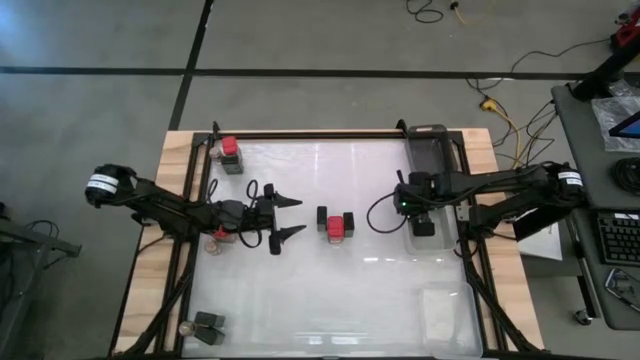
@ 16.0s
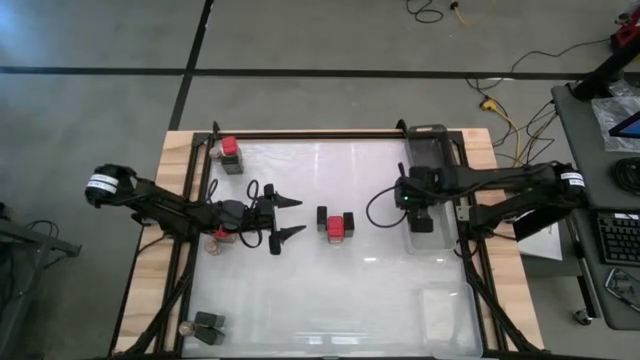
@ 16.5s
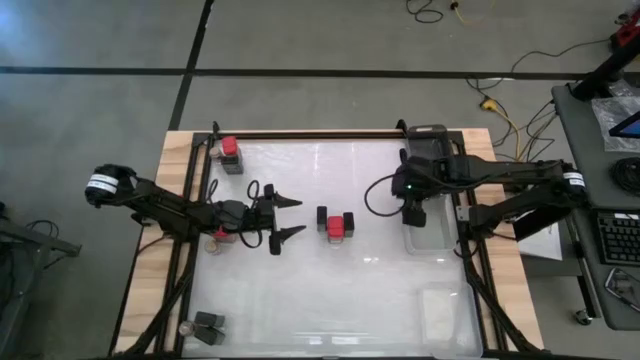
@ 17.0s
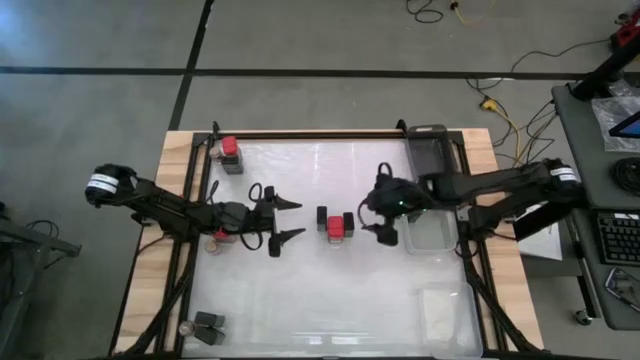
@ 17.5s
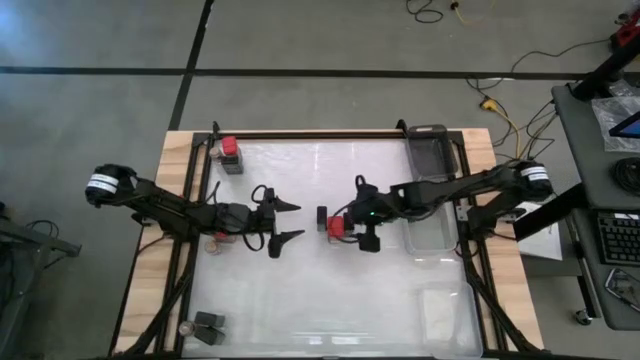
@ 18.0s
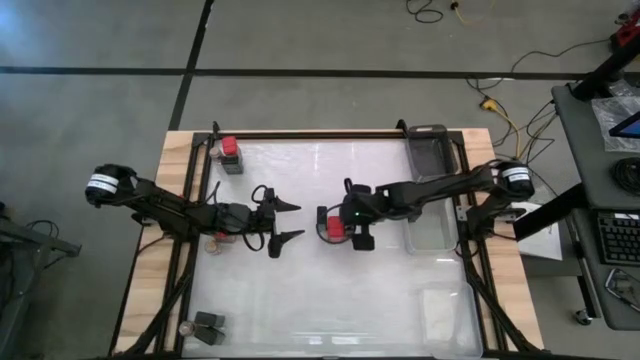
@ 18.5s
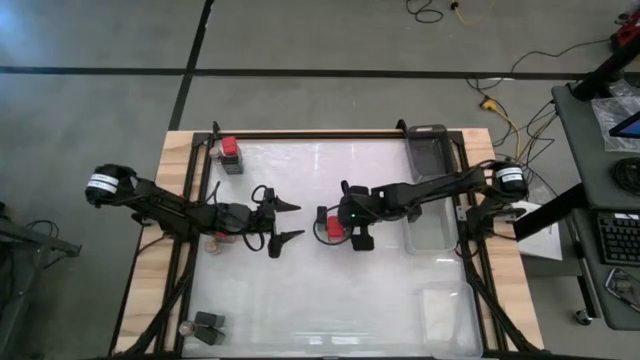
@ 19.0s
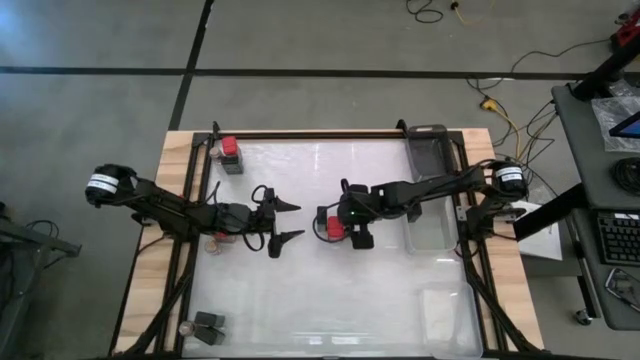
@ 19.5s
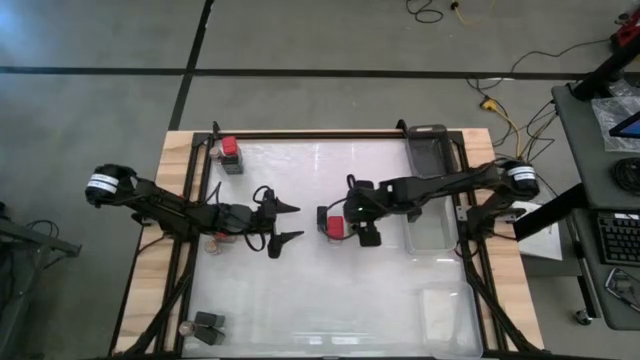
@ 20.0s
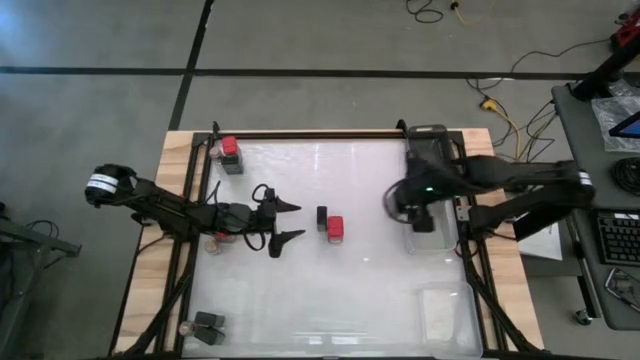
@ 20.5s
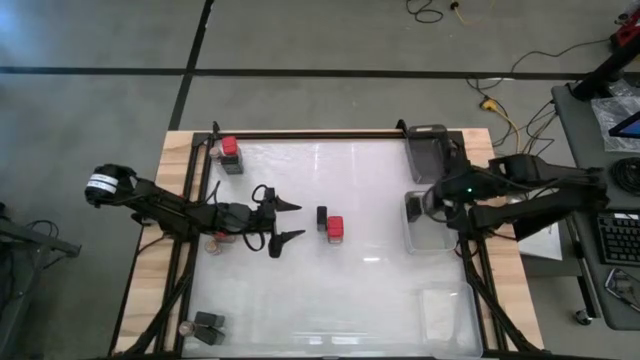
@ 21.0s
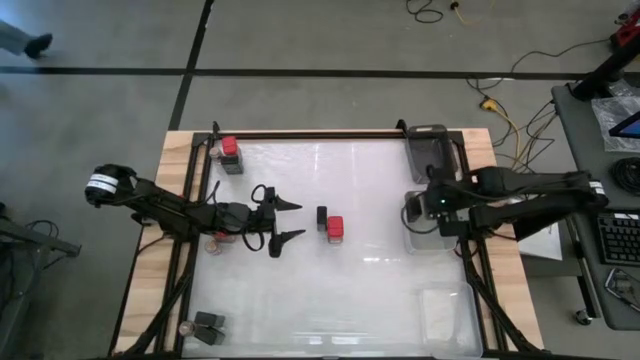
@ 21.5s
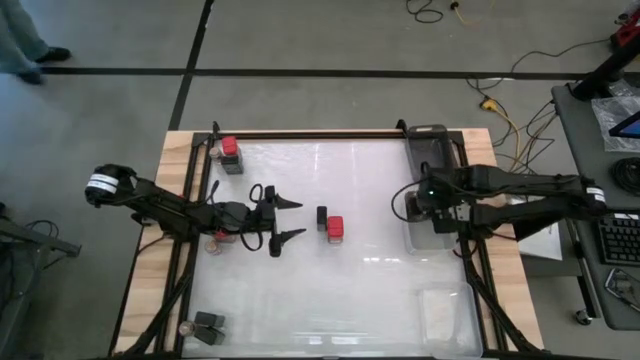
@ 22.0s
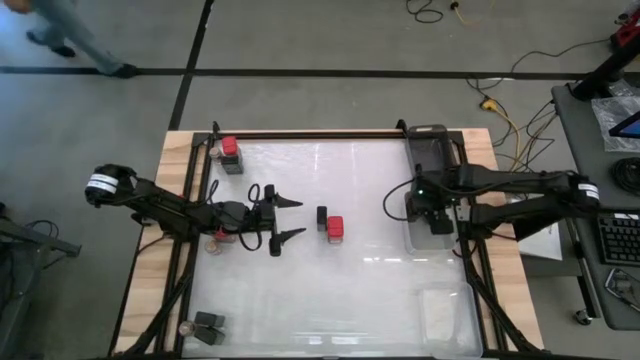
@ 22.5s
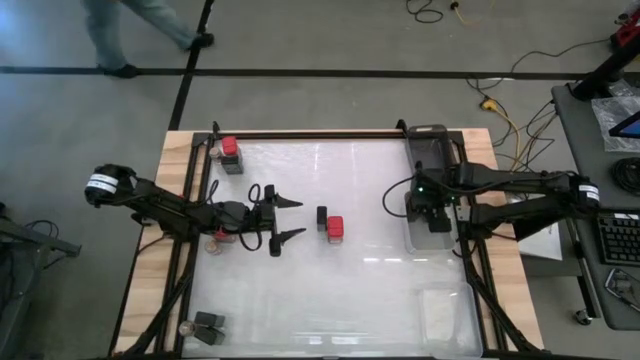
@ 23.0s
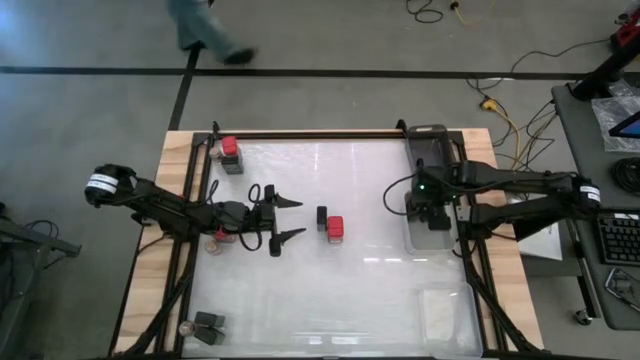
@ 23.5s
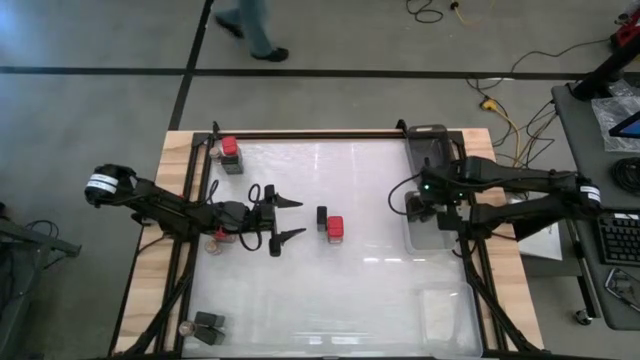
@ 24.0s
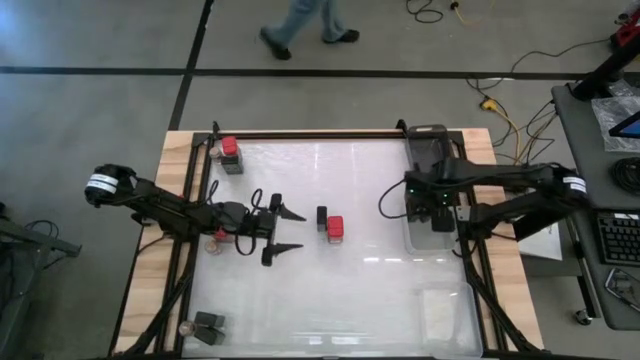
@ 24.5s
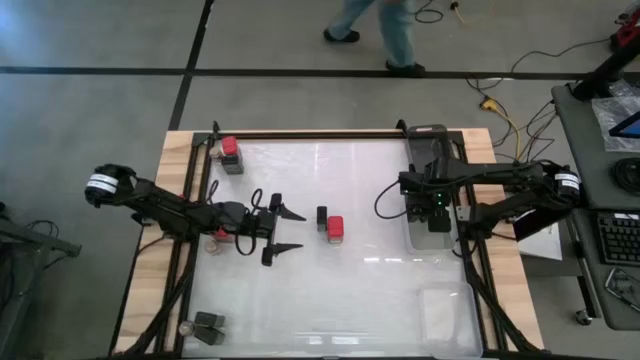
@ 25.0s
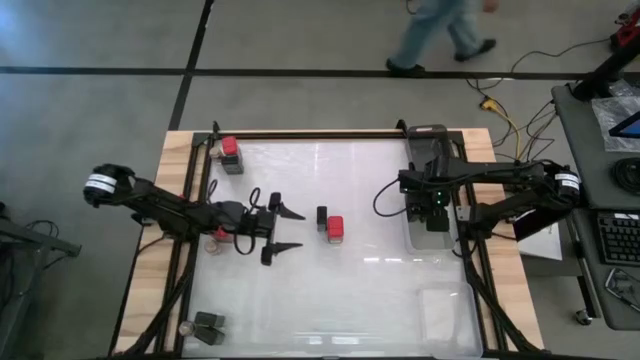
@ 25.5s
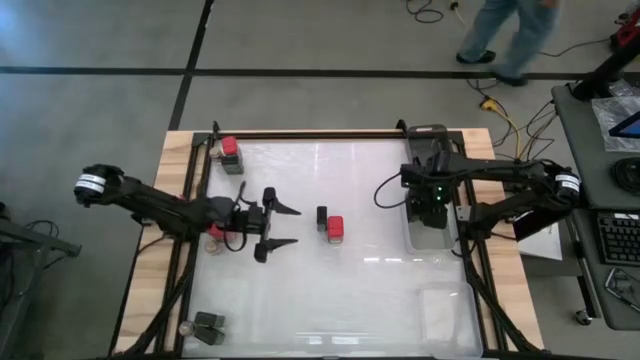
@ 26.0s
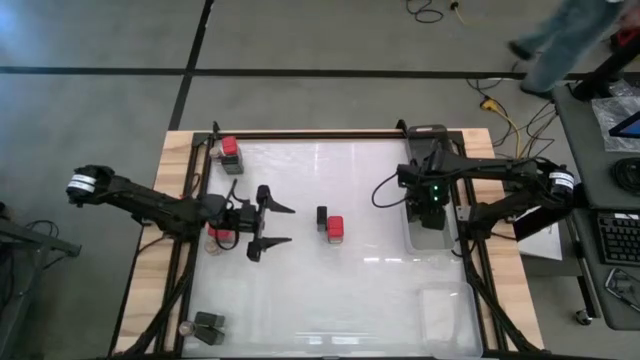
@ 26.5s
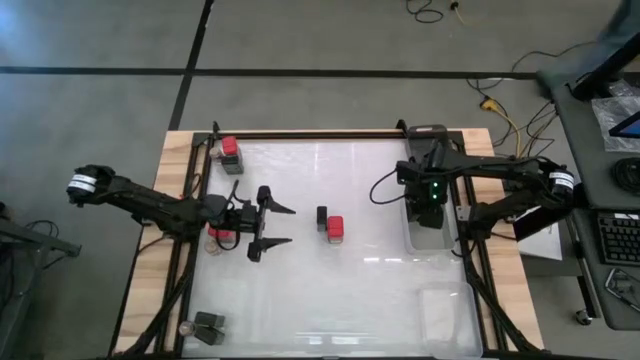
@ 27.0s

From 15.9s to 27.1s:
Task: Sort spices by type
Put the green seasoning can into the gray bin

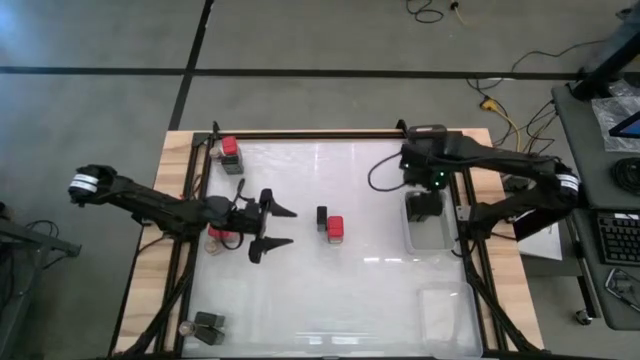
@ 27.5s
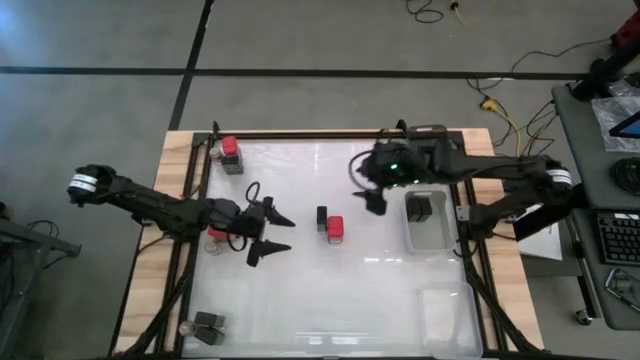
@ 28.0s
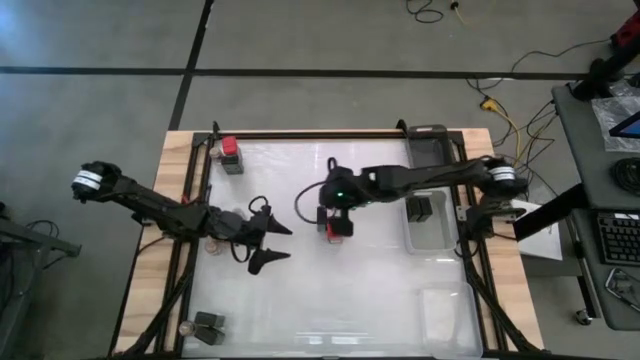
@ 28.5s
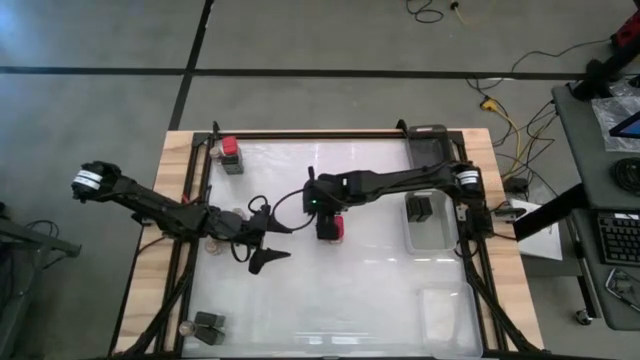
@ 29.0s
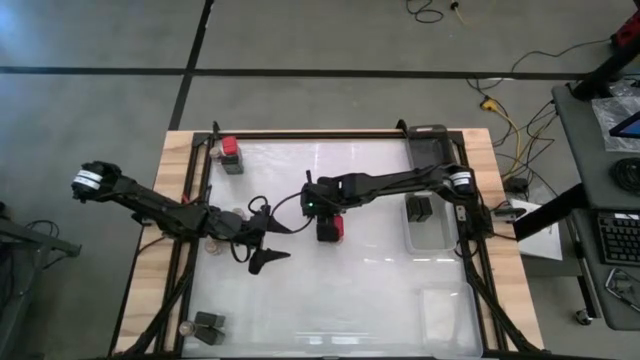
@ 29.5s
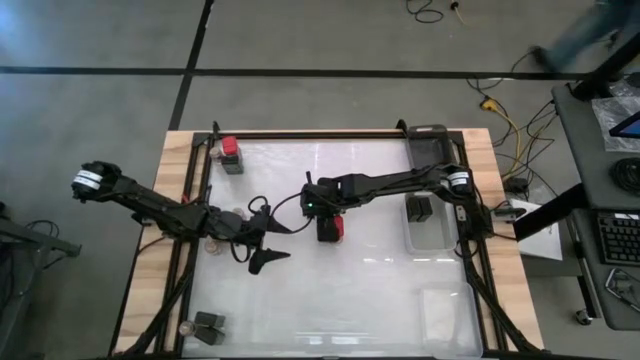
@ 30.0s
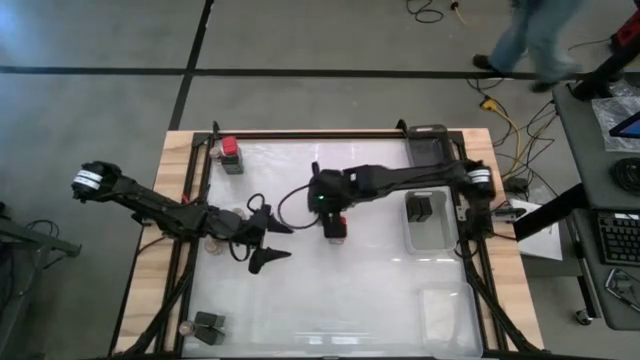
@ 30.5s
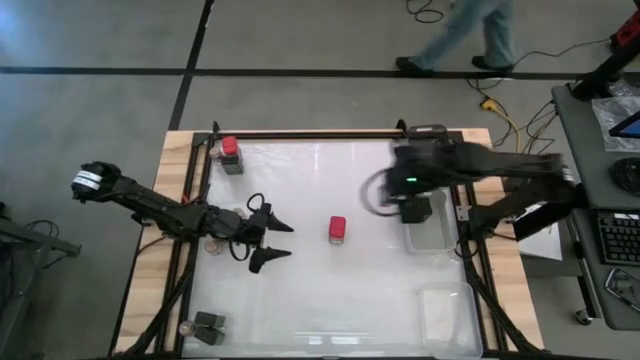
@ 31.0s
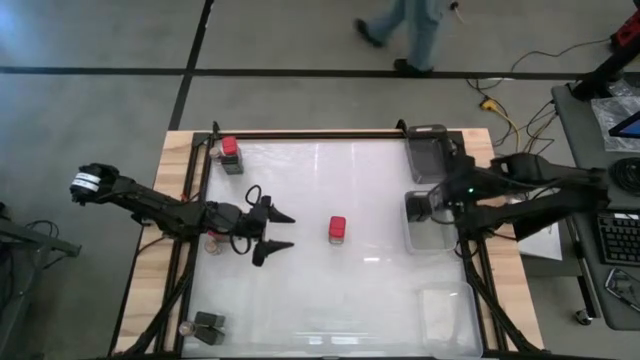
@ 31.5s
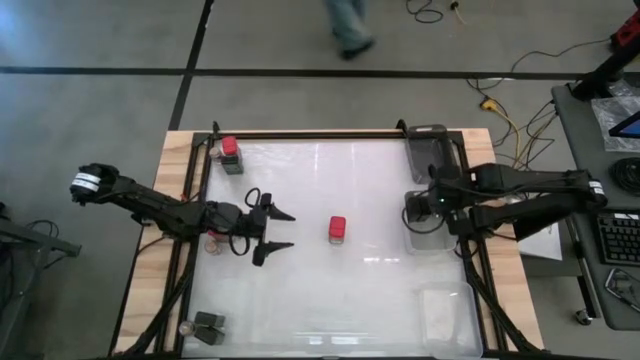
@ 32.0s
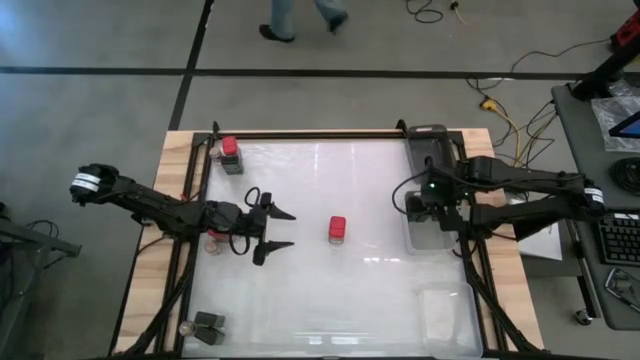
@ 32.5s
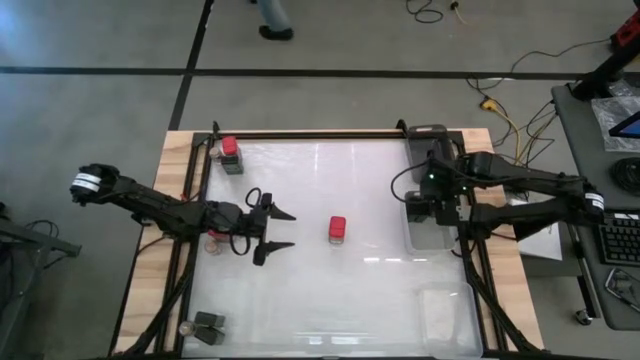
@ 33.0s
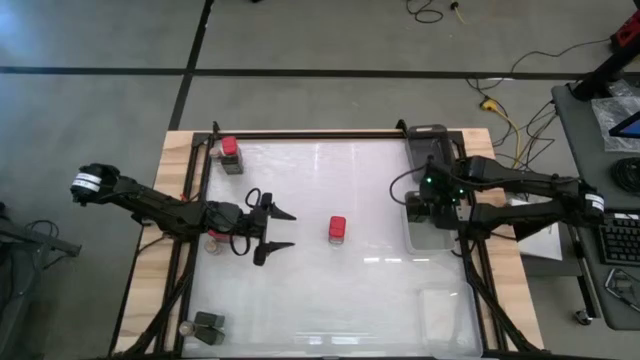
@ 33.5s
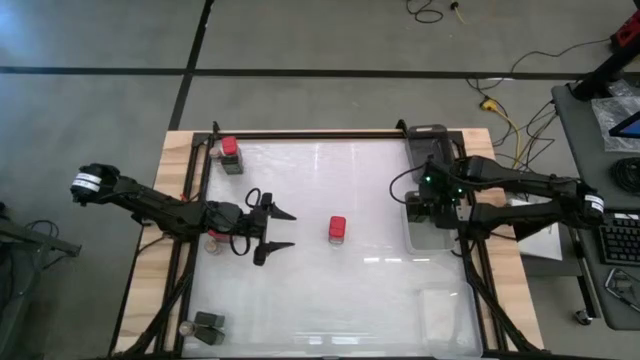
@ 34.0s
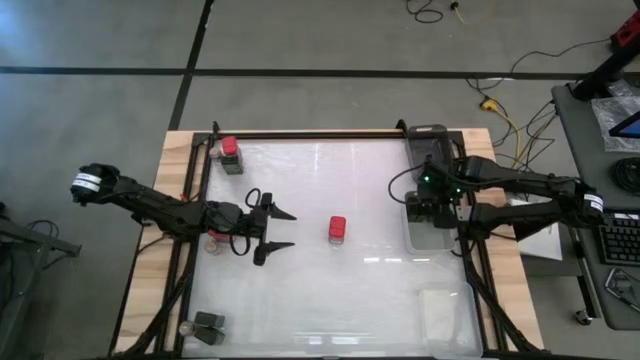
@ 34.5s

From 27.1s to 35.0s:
Put the green seasoning can into the gray bin

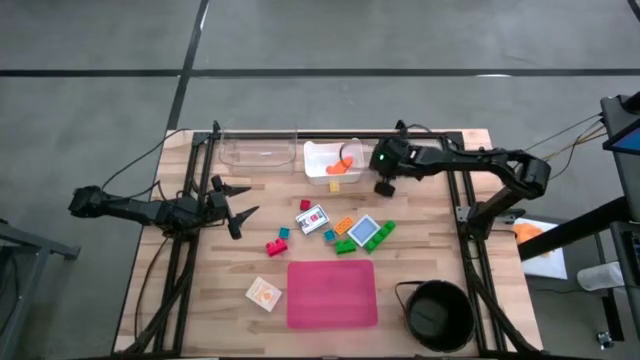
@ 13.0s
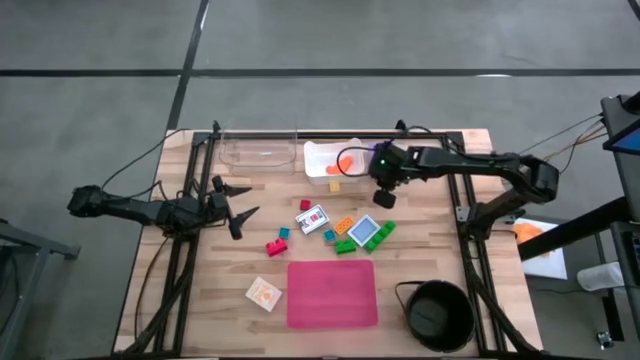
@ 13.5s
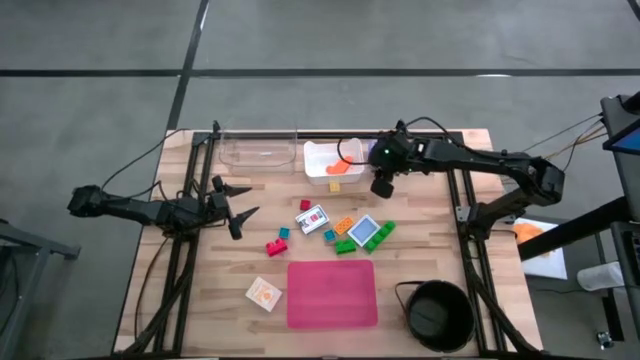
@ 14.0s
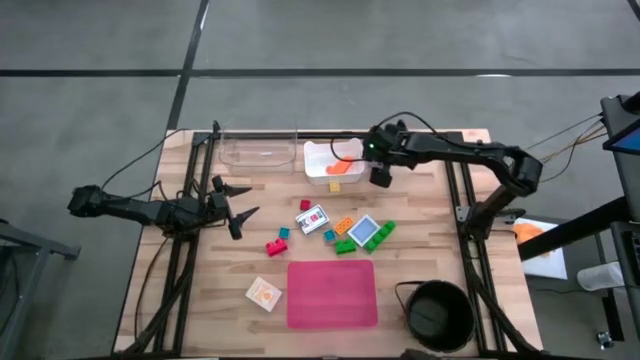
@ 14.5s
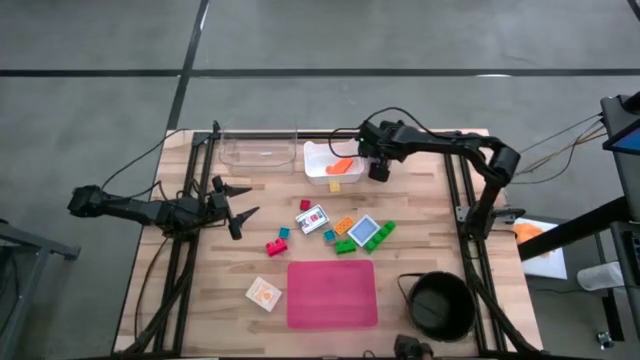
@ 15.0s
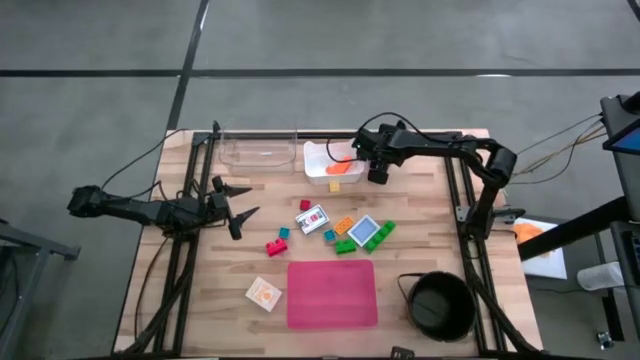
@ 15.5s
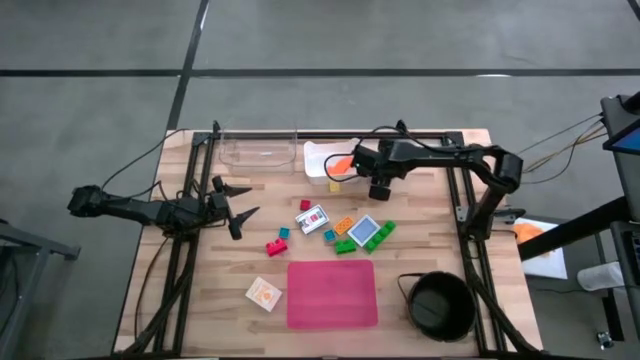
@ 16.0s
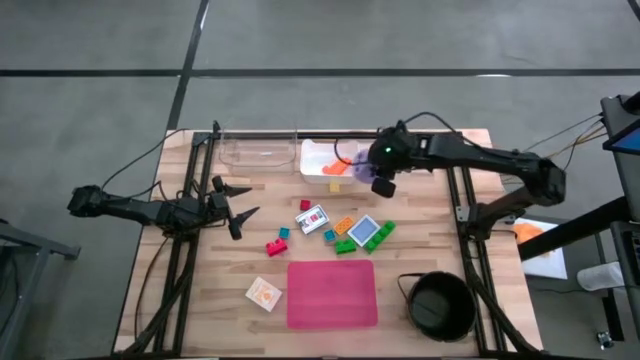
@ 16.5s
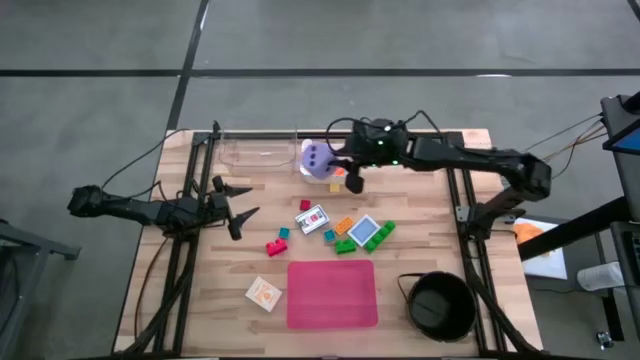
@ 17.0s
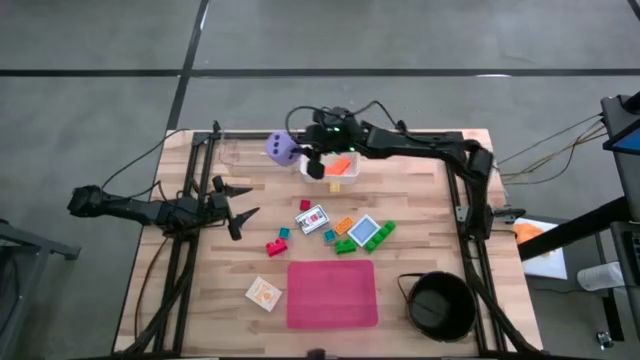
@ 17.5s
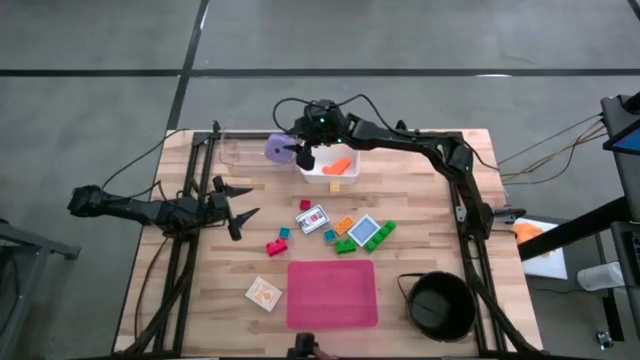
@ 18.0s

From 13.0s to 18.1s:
Task: Pick & Place Toys
Put the violet die into the transparent bin
